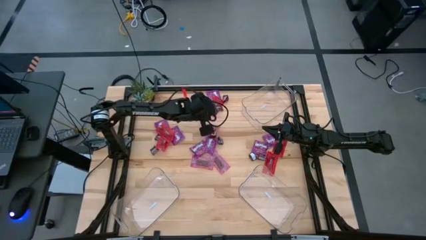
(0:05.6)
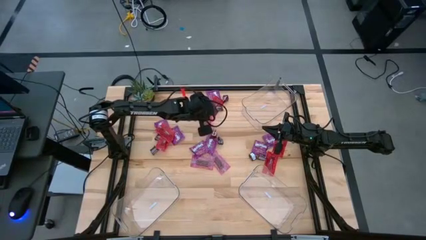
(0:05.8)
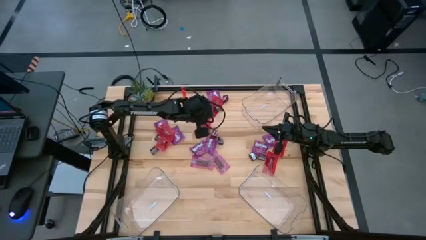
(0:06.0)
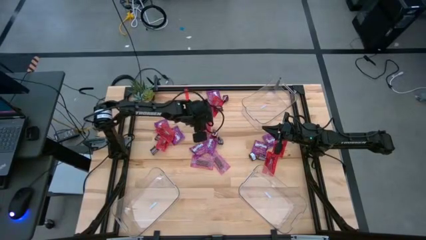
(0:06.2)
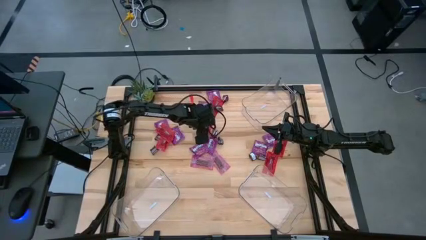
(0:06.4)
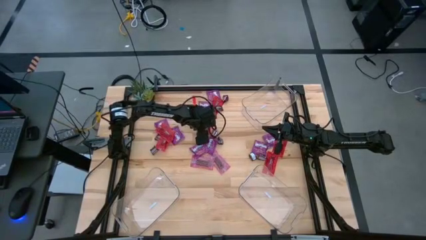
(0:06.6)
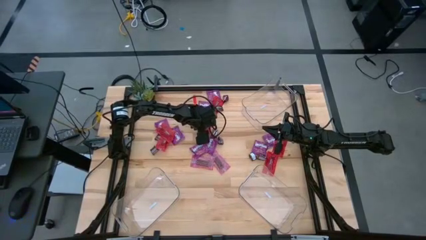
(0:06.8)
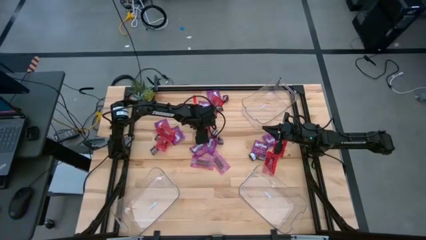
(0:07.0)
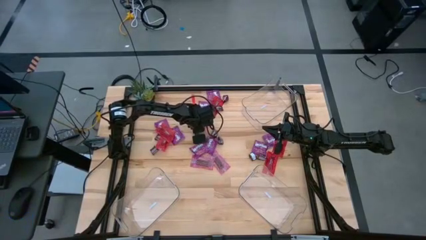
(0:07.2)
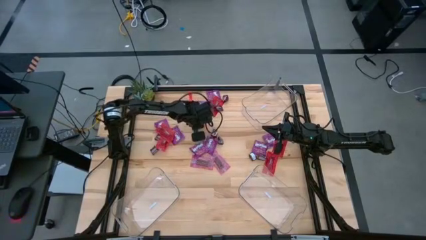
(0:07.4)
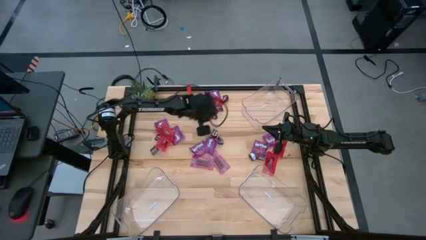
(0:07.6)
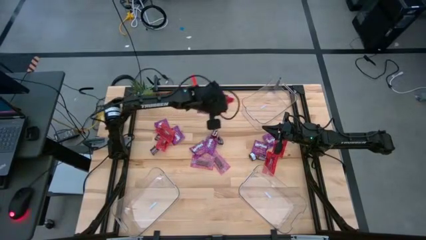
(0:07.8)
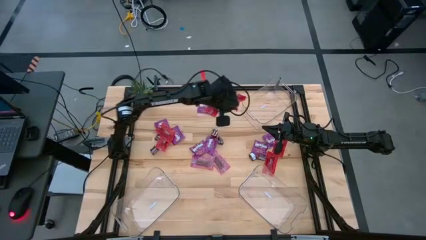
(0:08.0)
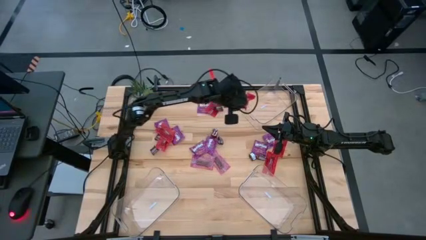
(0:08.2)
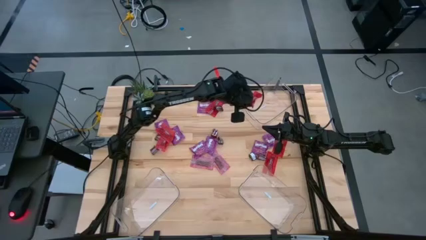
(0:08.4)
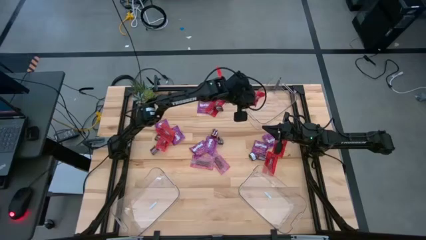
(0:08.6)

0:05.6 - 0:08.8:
Task: Sort candy
Put the red candy into the top transparent bin

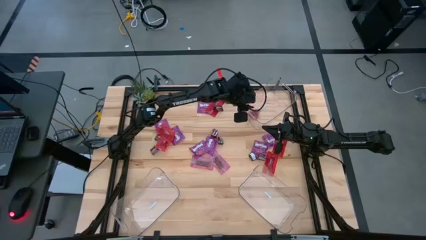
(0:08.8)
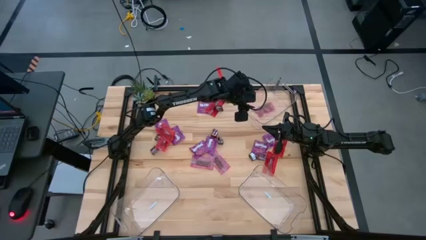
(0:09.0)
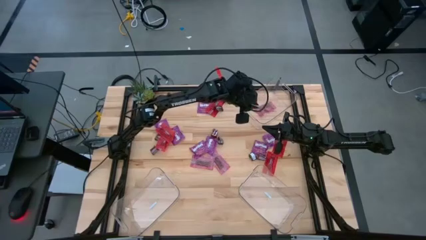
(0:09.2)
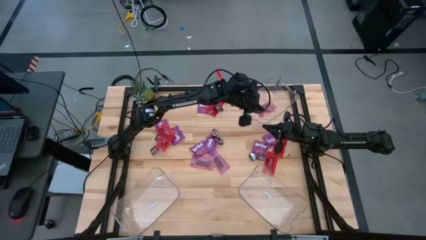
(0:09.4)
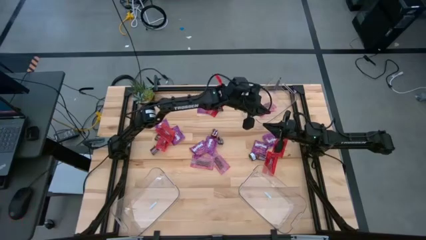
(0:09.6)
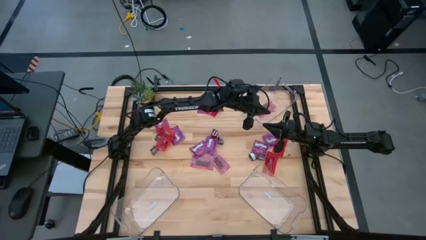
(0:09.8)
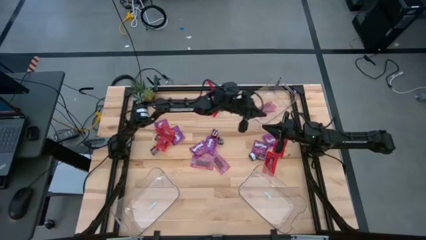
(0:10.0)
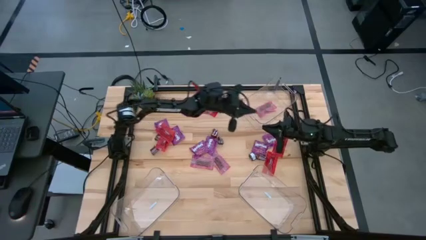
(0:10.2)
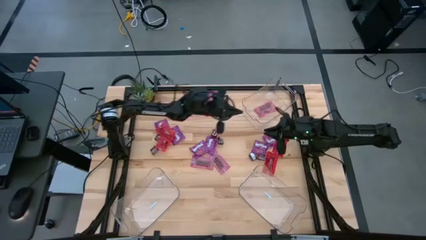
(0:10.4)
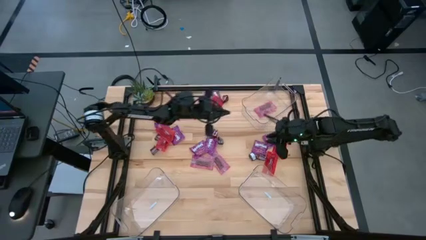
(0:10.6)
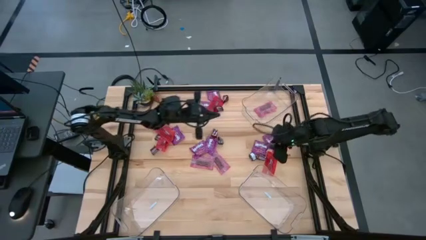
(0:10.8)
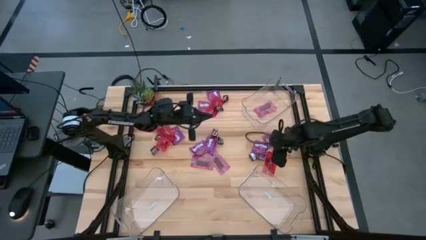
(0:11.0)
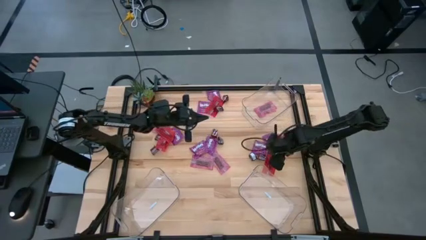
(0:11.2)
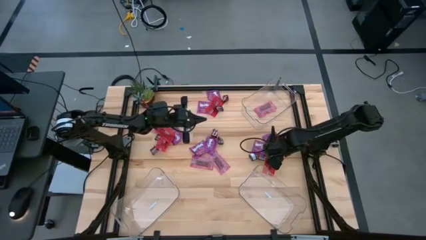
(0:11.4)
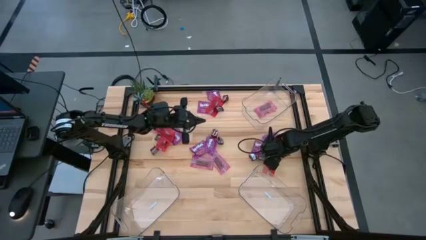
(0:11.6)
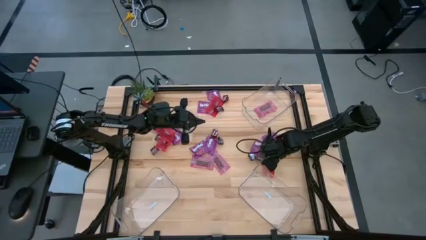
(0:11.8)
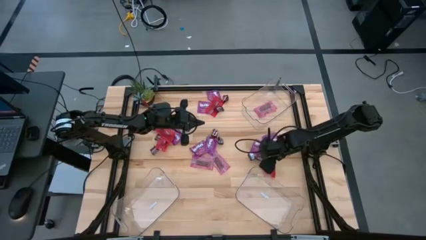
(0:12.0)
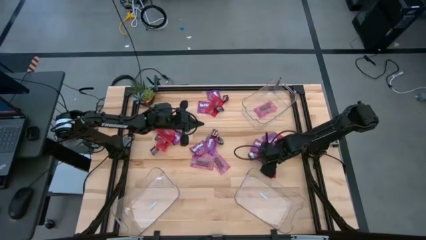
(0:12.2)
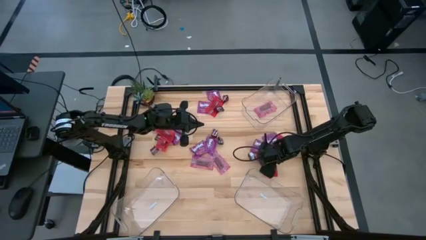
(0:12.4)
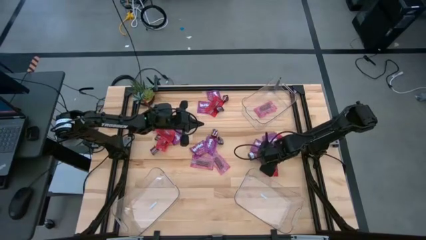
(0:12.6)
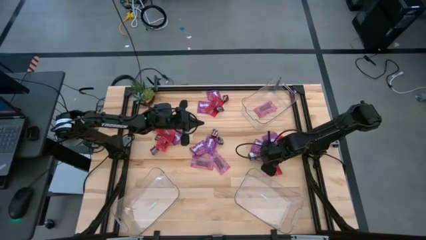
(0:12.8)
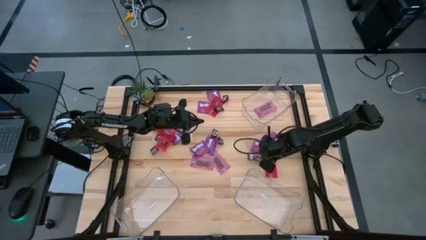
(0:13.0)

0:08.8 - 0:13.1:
Put the red candy in the top transparent bin

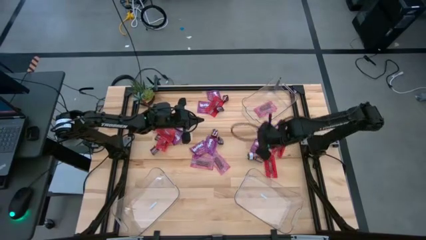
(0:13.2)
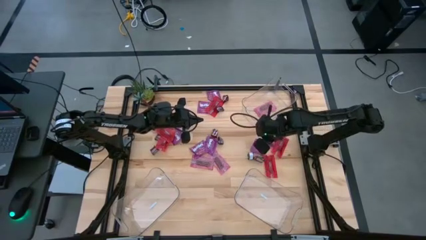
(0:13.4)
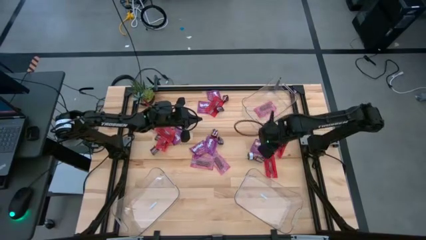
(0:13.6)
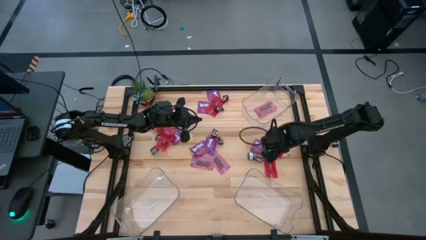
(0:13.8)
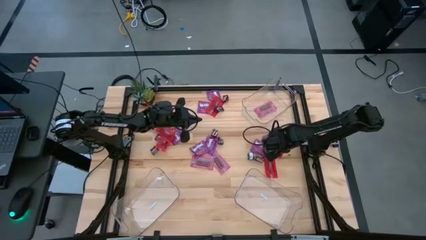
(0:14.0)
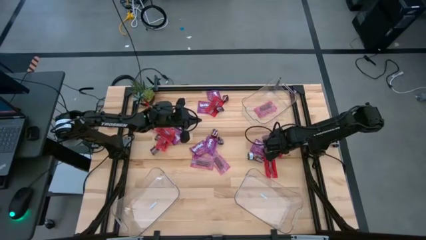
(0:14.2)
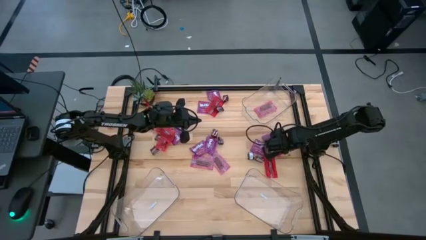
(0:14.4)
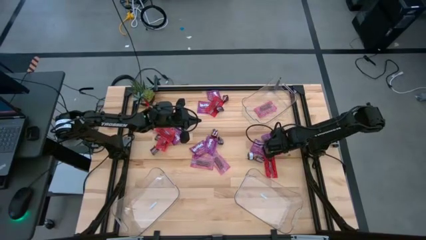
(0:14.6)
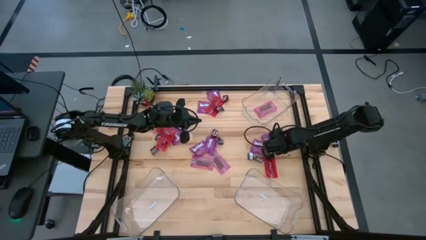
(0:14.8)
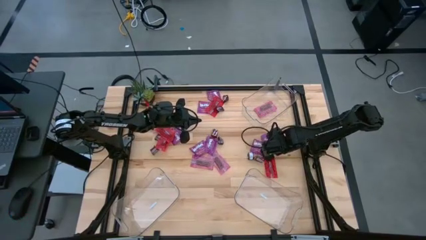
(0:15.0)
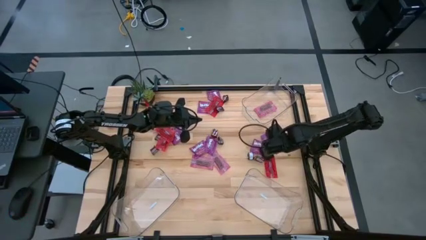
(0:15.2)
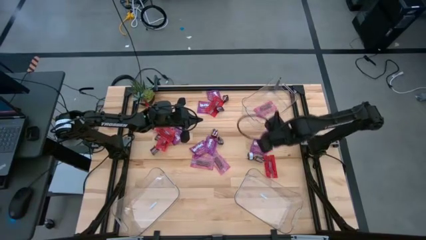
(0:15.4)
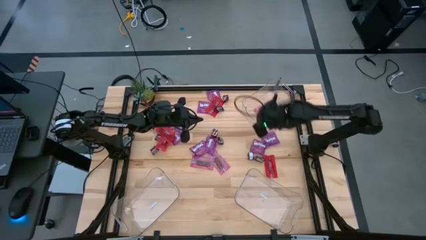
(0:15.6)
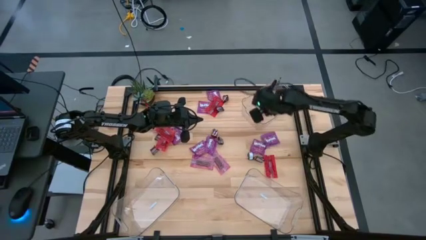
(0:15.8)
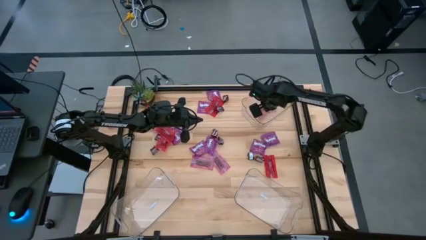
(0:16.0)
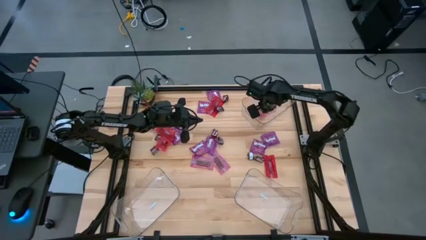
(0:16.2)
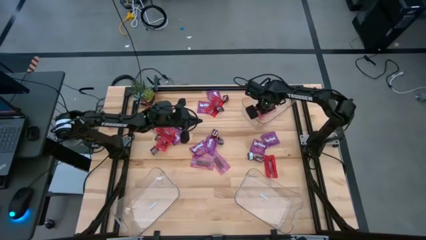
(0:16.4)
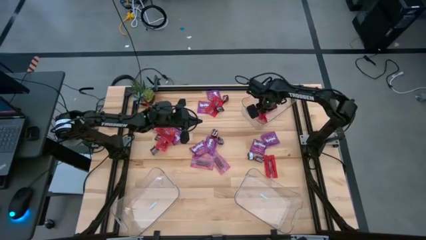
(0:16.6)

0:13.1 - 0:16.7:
Put the red candy into the top transparent bin

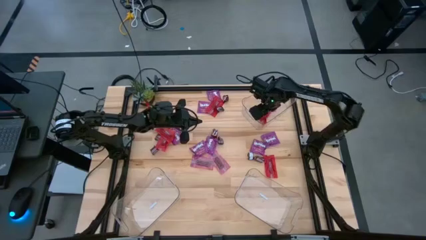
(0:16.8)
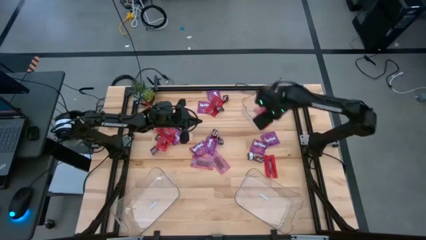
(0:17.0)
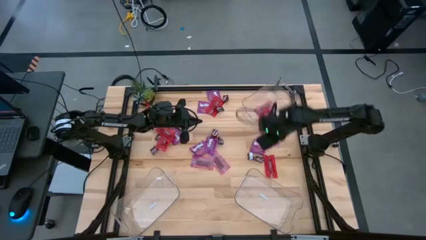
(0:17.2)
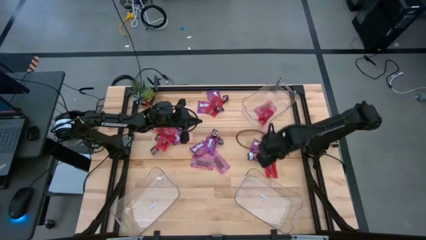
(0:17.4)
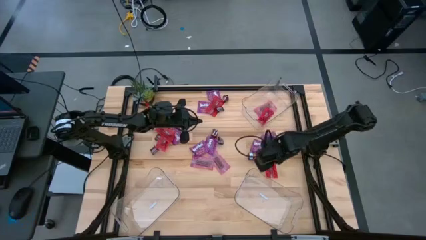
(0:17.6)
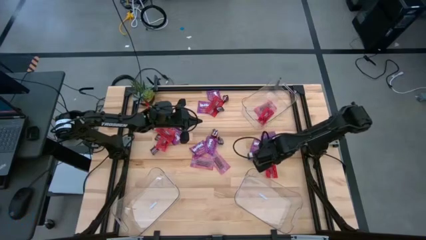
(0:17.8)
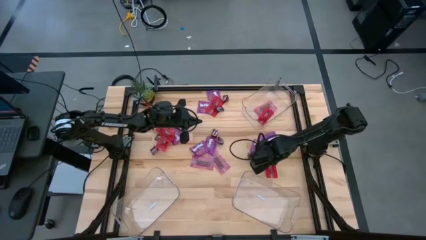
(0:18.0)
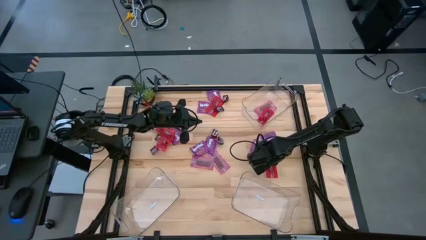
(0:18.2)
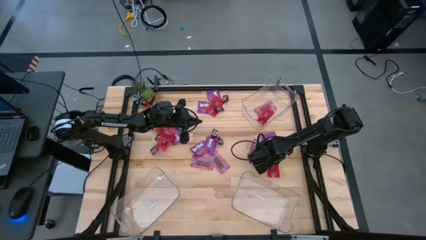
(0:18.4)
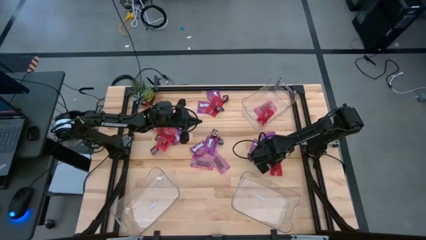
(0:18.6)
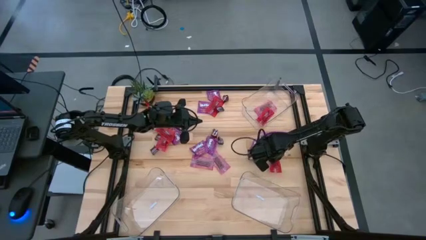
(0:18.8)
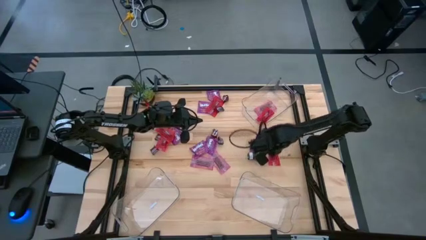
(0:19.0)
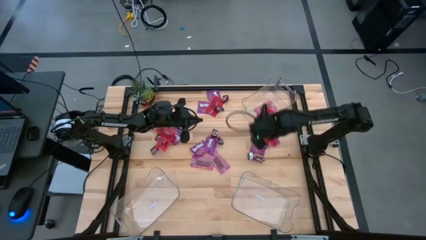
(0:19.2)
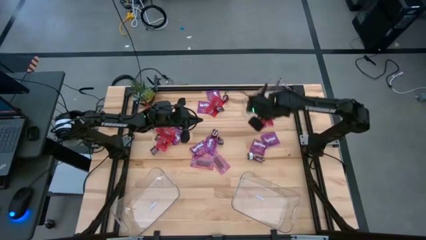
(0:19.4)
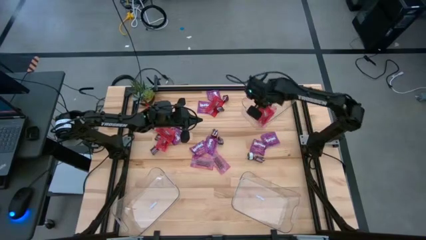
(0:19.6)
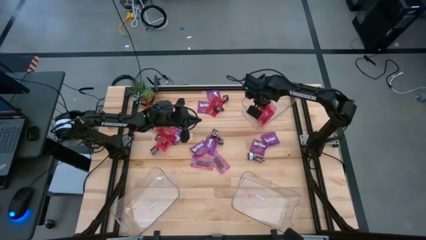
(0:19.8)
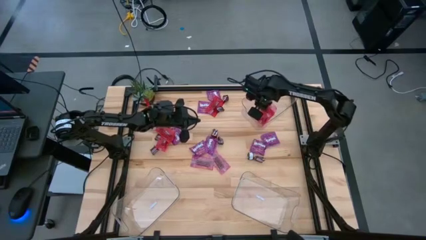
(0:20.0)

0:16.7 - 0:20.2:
Put the red candy into the top transparent bin

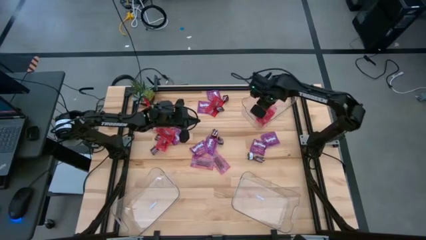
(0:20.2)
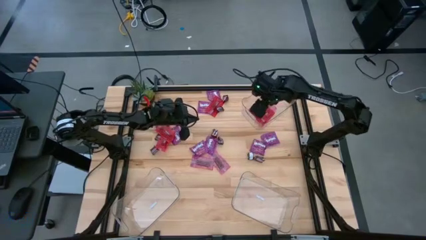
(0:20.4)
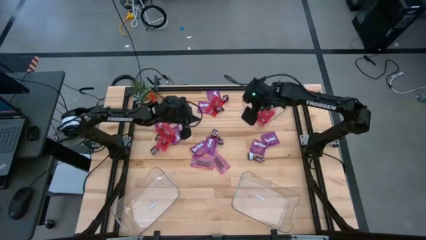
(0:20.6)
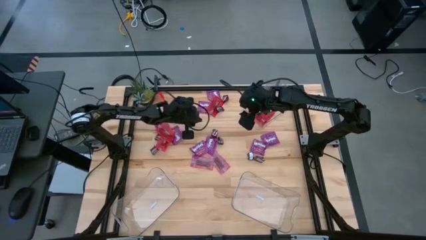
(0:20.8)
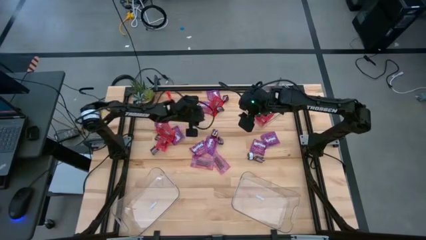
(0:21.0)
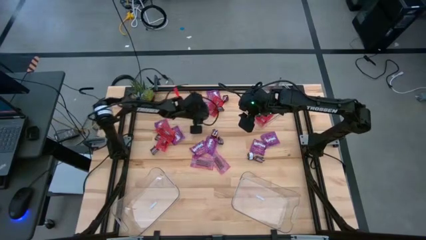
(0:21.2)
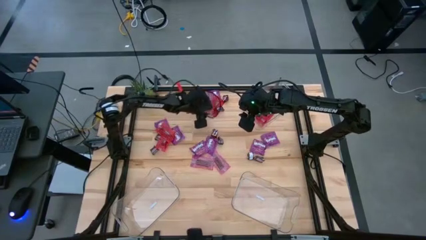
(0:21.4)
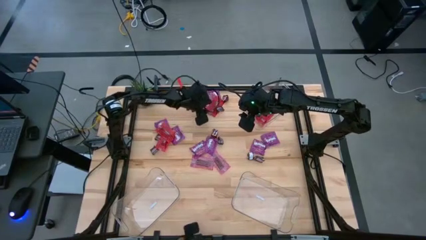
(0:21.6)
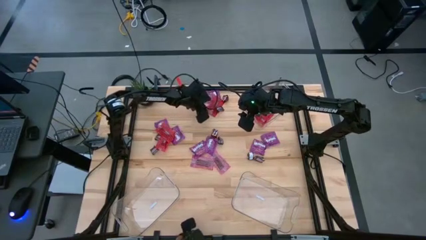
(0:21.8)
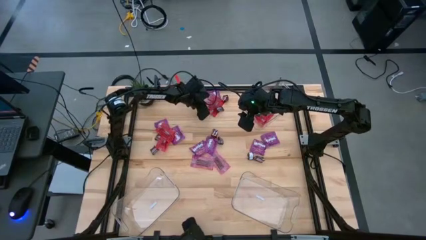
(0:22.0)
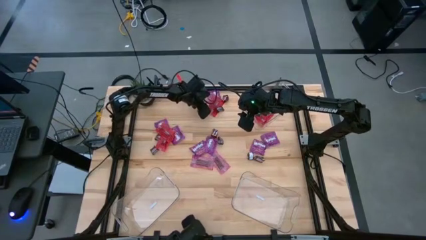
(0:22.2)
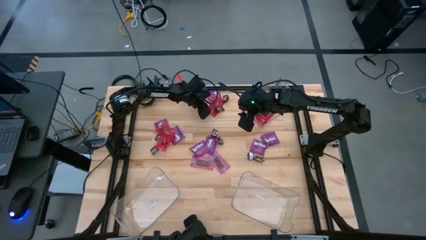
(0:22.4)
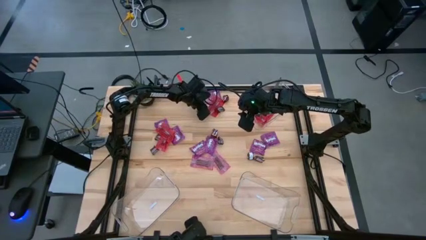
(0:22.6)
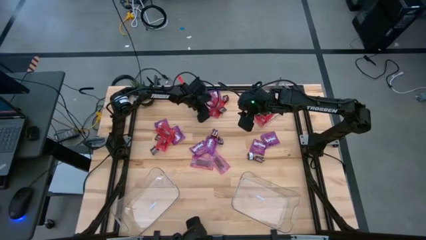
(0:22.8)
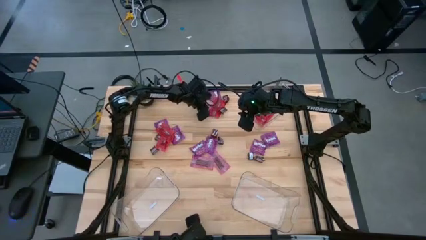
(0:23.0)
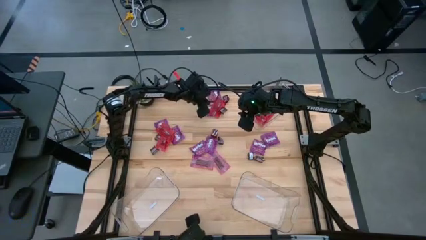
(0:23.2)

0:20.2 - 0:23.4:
Put the red candy into the top transparent bin
